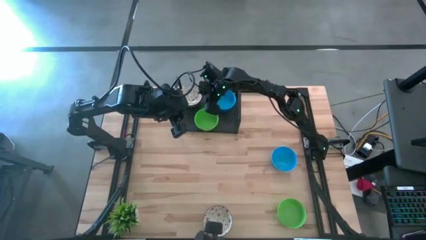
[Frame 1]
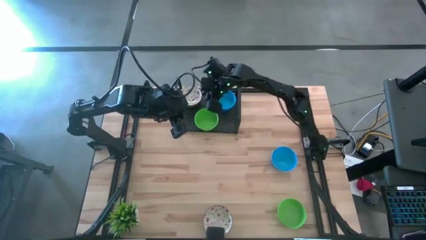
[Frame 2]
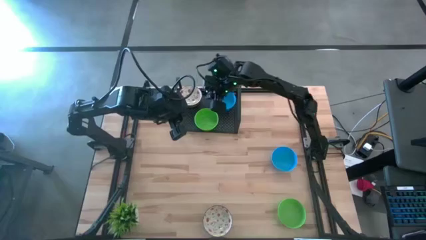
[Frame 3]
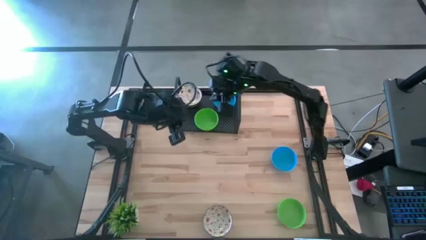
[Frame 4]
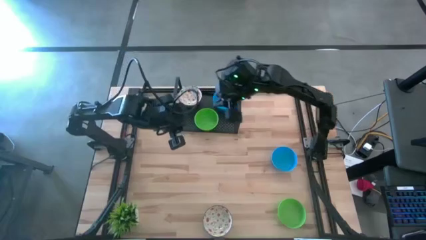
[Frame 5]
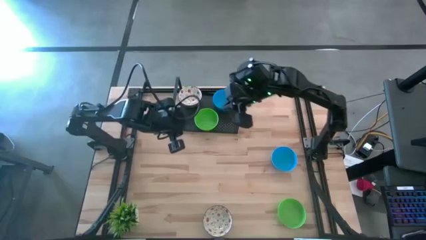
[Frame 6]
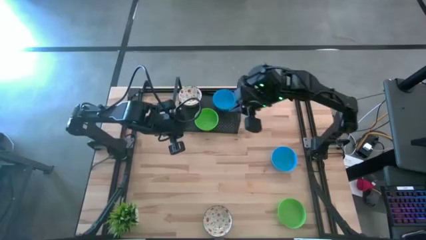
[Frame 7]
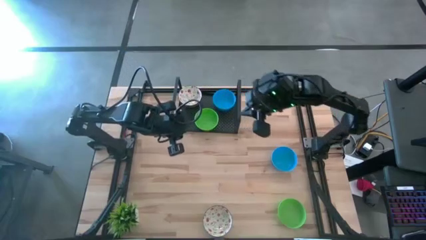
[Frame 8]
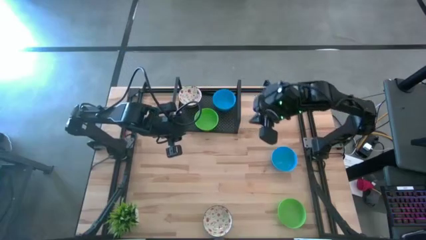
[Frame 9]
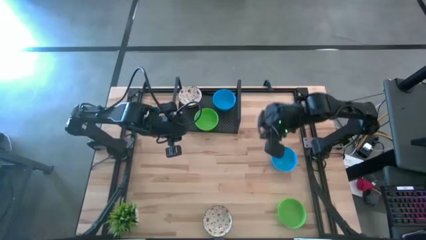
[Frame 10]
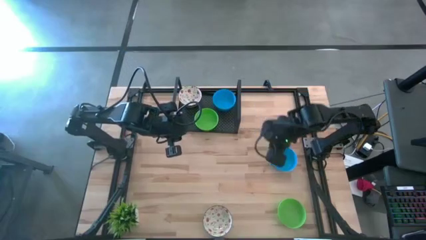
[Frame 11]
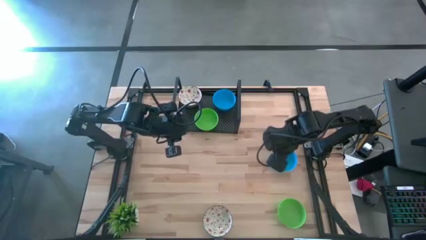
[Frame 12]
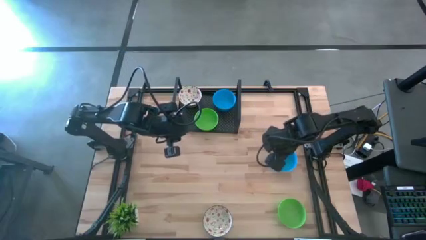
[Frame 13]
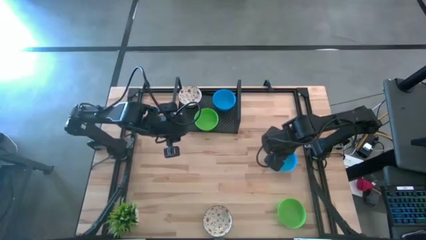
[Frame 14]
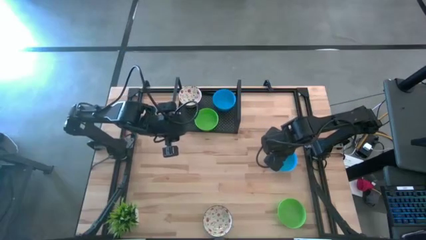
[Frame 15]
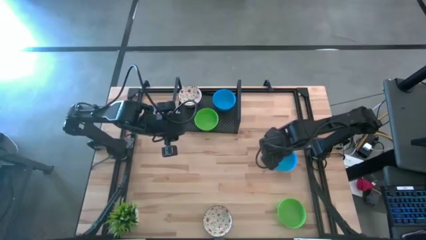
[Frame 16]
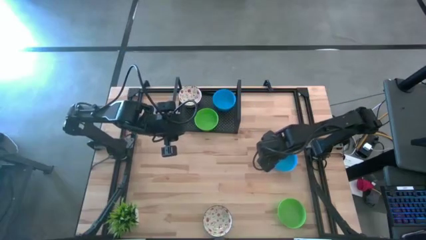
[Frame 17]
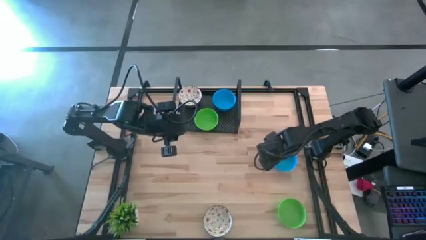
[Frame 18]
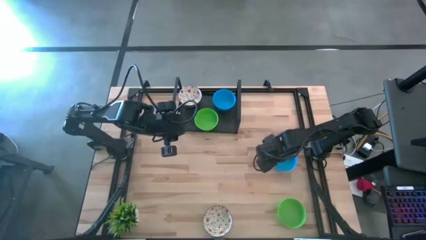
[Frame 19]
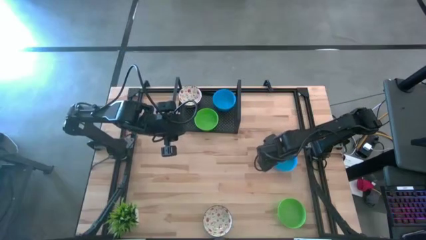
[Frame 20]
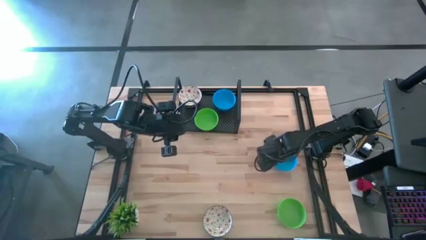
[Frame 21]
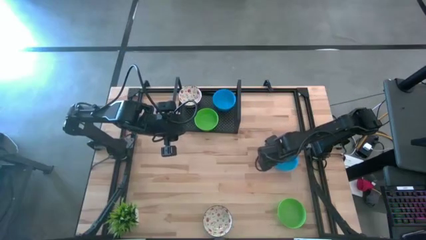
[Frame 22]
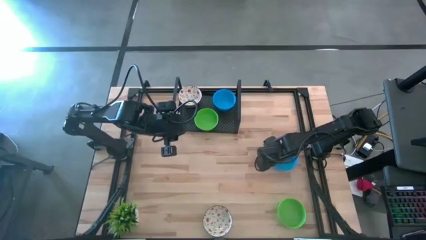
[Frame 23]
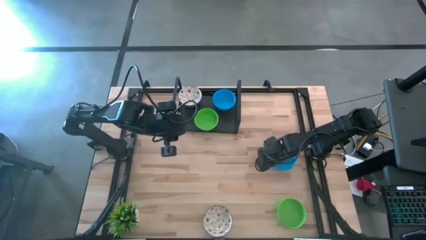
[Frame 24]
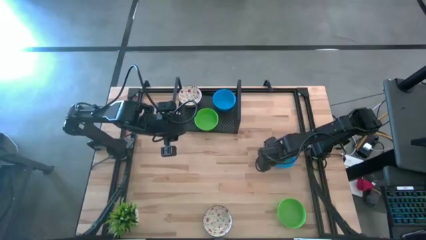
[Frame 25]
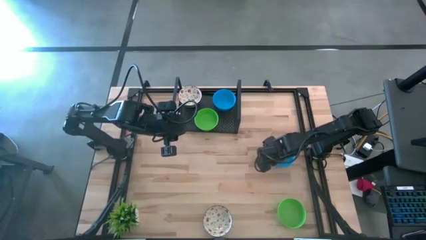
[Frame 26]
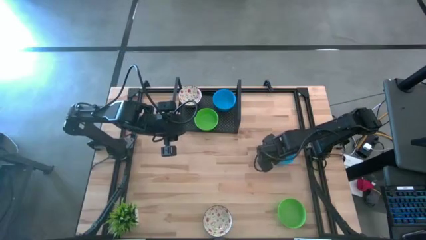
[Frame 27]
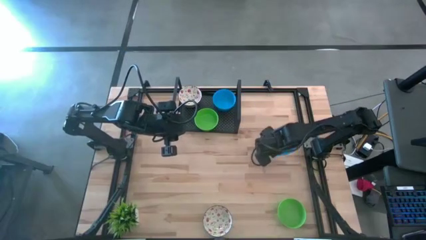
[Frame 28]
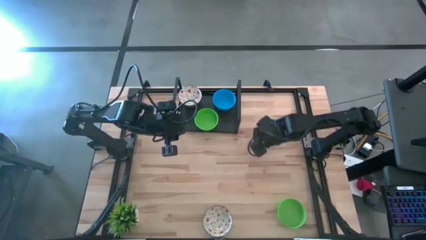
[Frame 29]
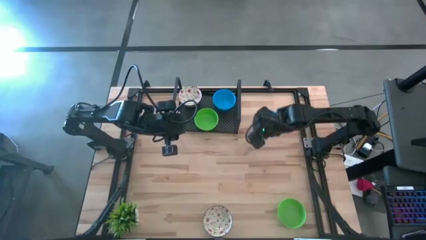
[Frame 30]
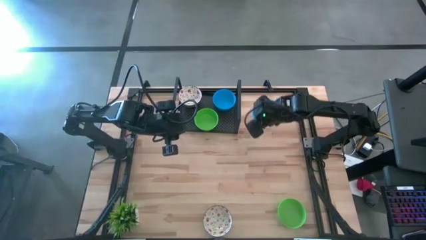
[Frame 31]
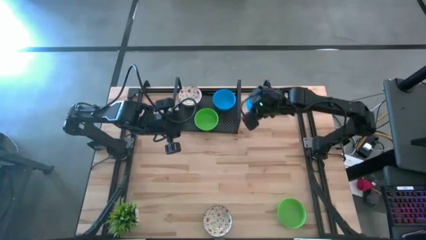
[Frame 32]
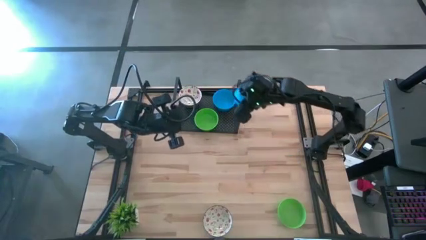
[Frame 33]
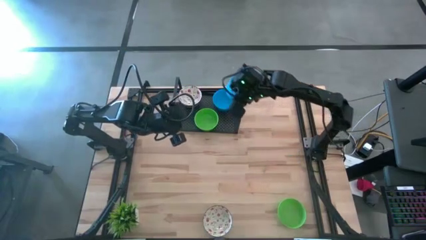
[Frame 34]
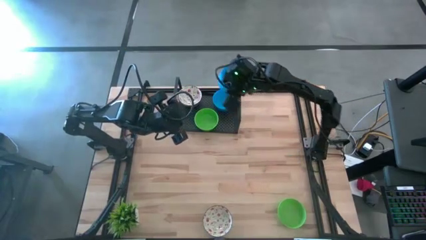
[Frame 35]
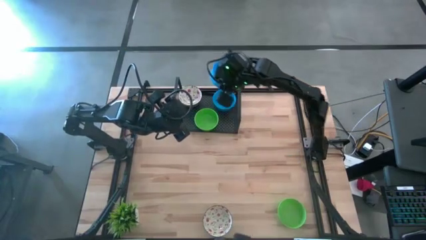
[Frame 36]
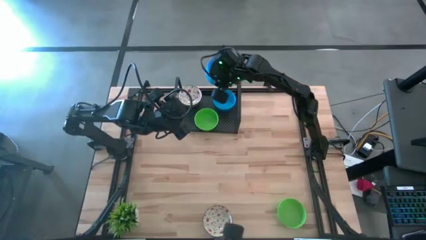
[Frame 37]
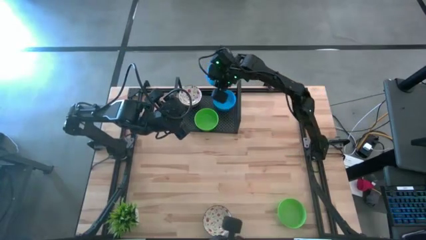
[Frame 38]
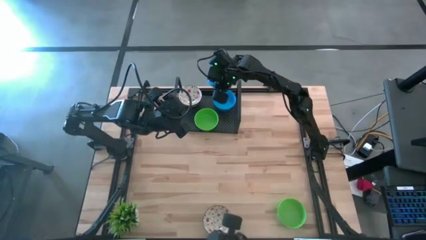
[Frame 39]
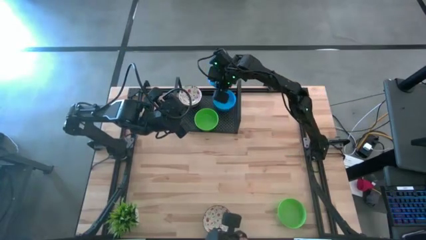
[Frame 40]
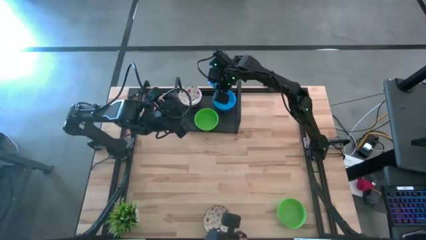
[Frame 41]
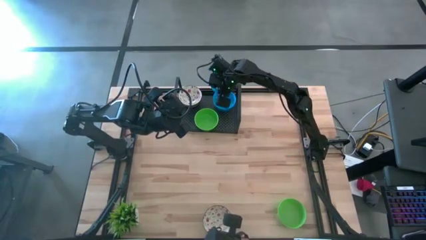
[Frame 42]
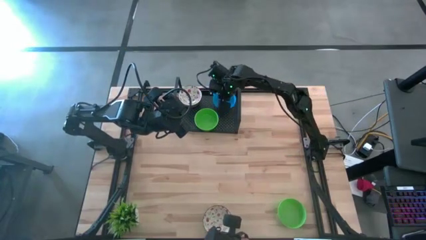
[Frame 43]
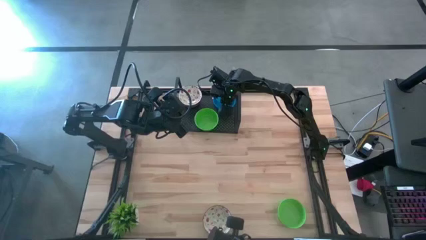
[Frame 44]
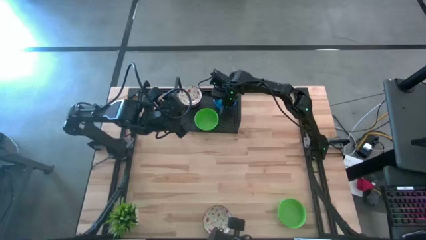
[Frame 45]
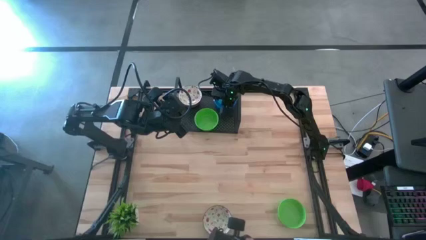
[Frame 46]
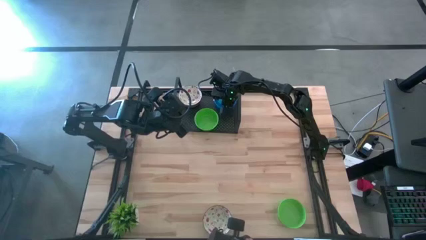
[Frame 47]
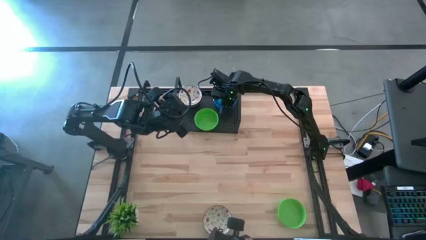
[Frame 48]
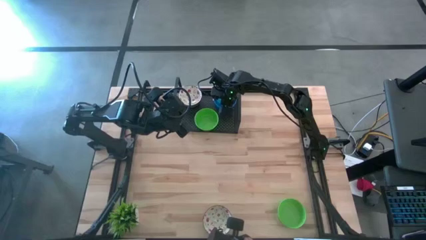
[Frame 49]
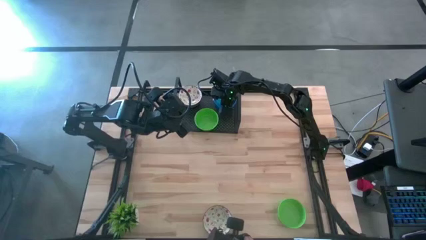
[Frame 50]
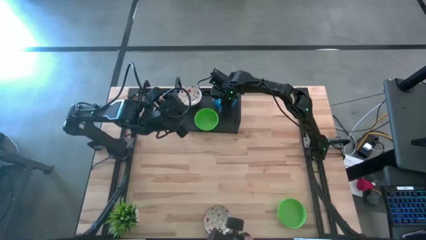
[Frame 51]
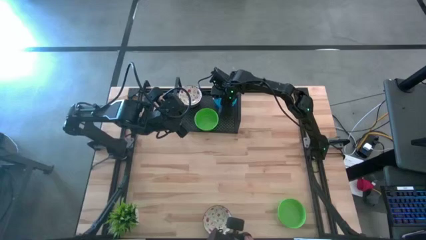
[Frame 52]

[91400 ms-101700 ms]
Task: Pick & Place Mini bowls
Stack the blue bowl on top of the blue bowls on the shelf

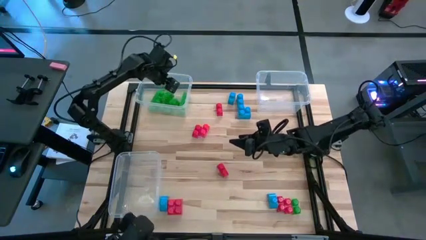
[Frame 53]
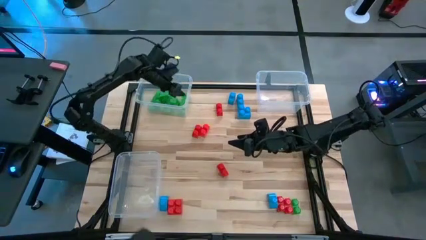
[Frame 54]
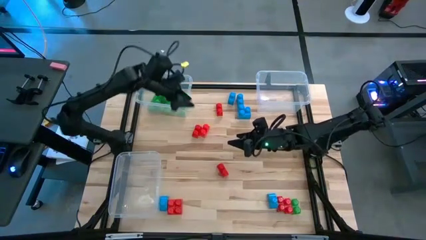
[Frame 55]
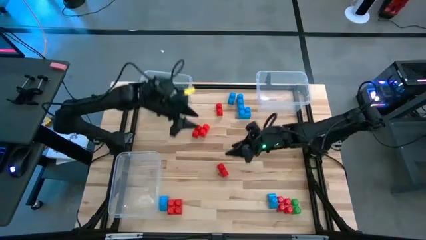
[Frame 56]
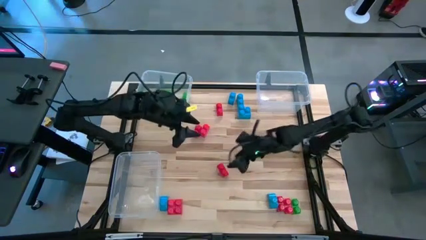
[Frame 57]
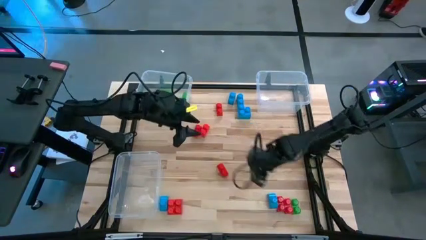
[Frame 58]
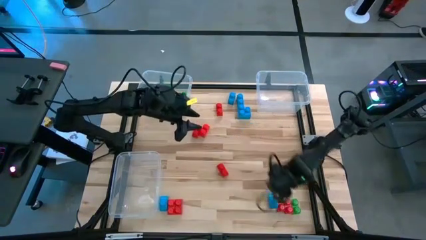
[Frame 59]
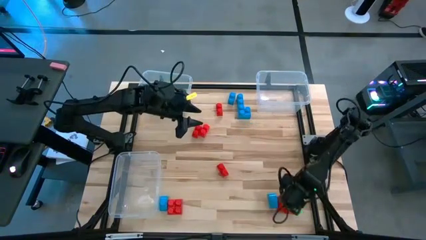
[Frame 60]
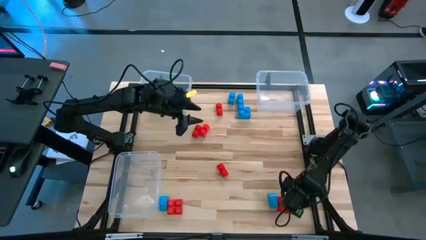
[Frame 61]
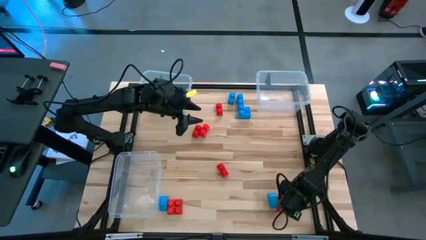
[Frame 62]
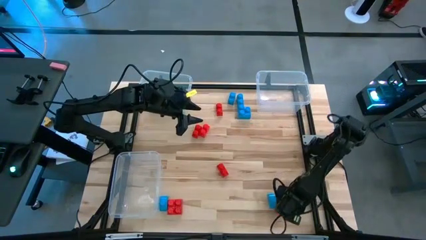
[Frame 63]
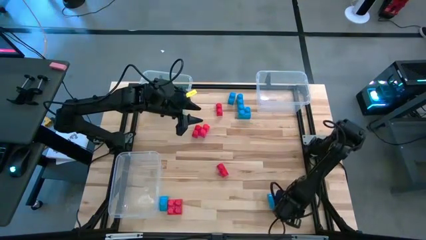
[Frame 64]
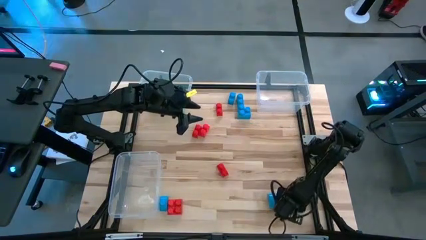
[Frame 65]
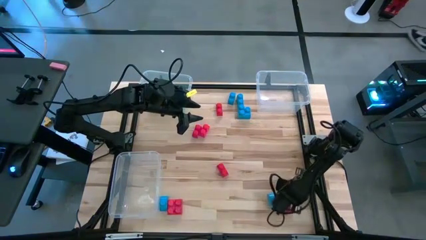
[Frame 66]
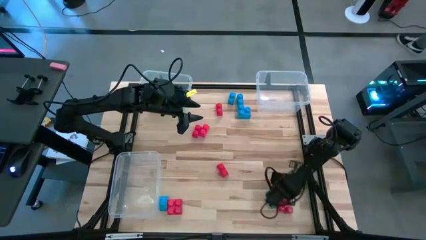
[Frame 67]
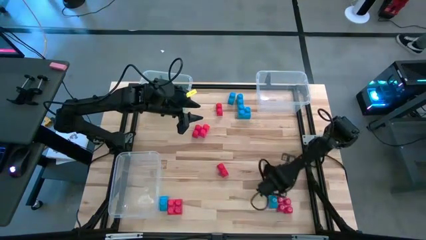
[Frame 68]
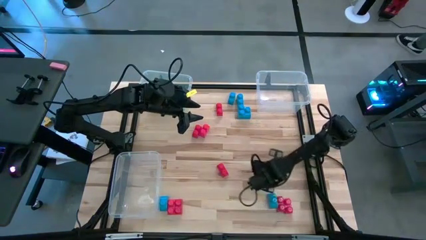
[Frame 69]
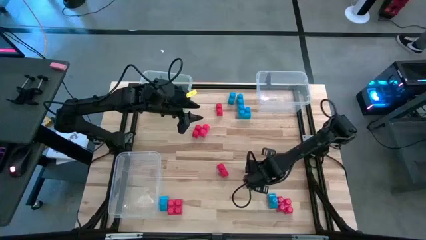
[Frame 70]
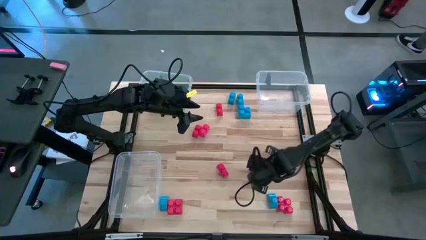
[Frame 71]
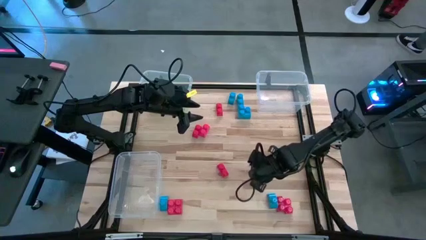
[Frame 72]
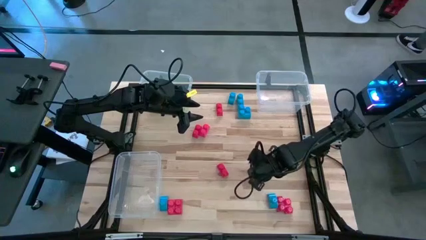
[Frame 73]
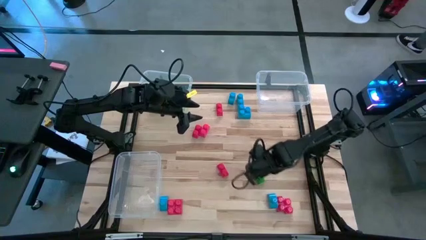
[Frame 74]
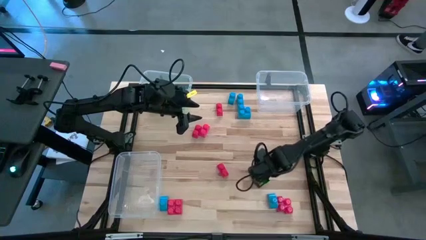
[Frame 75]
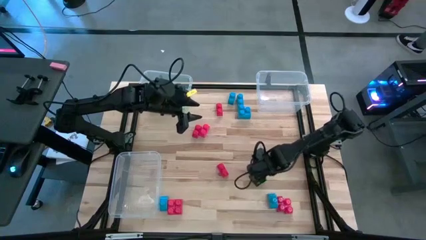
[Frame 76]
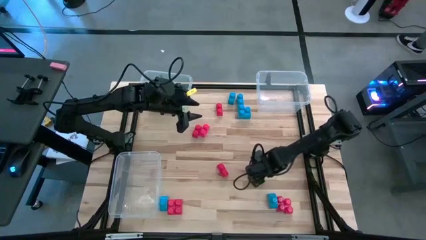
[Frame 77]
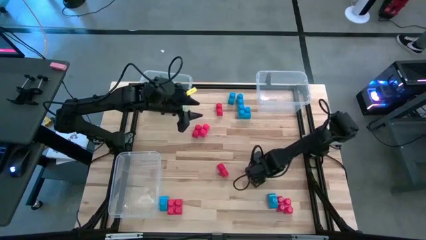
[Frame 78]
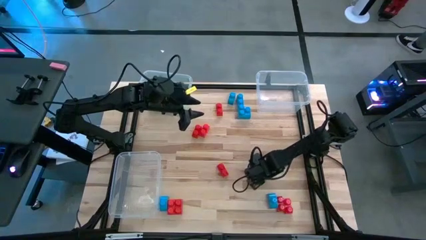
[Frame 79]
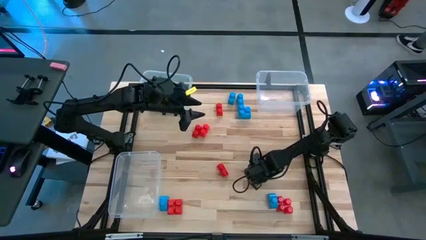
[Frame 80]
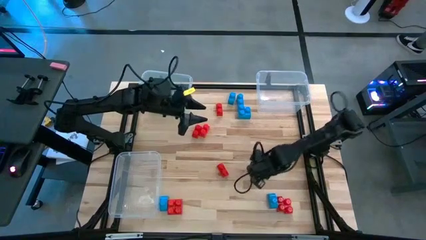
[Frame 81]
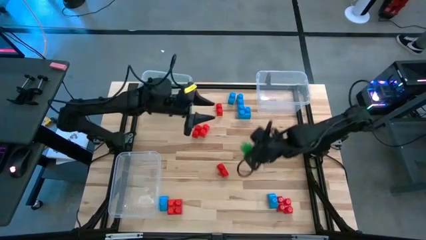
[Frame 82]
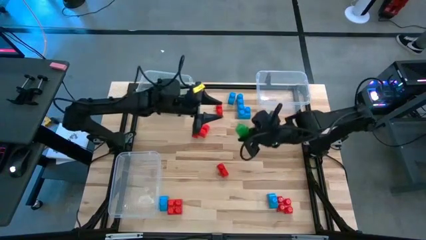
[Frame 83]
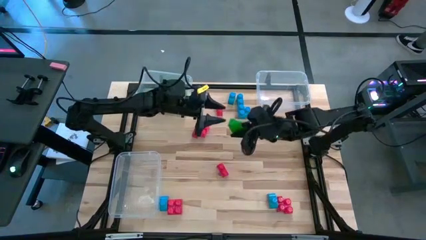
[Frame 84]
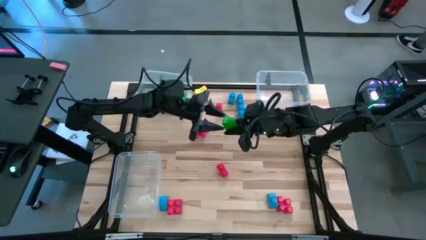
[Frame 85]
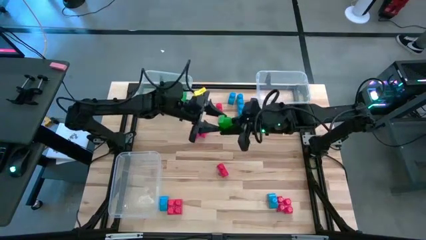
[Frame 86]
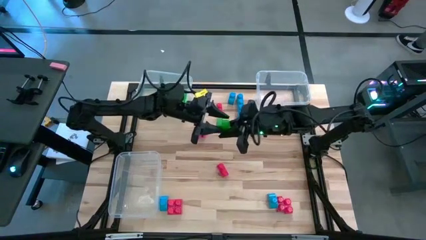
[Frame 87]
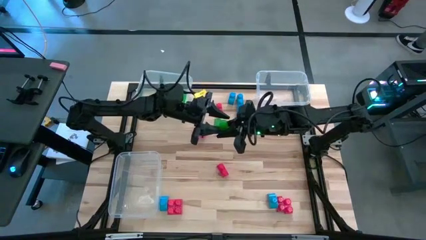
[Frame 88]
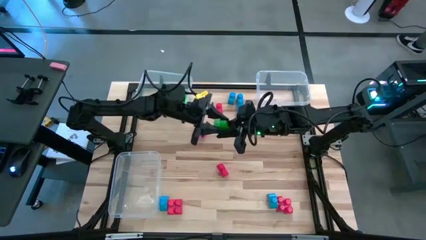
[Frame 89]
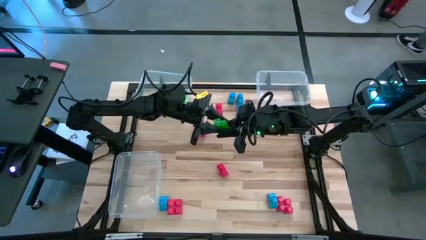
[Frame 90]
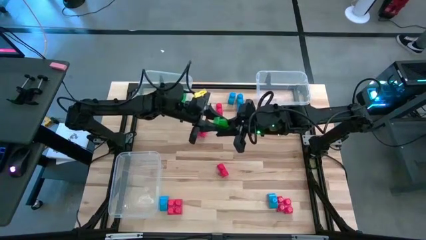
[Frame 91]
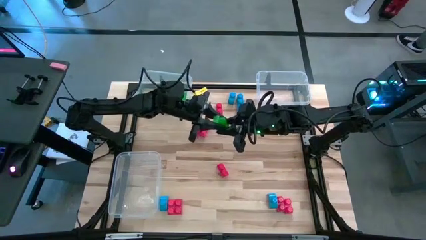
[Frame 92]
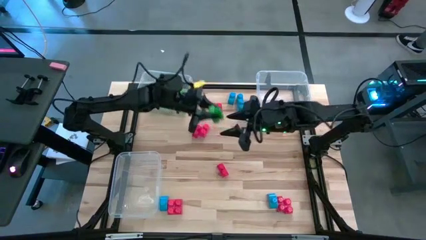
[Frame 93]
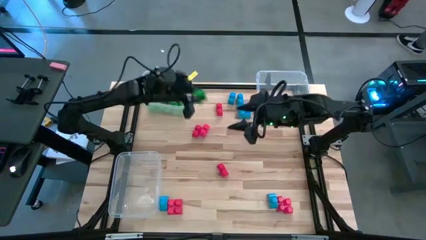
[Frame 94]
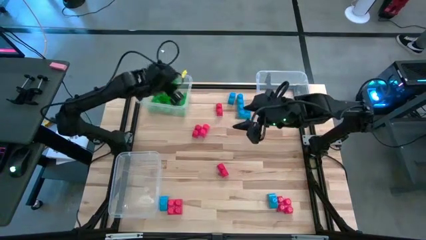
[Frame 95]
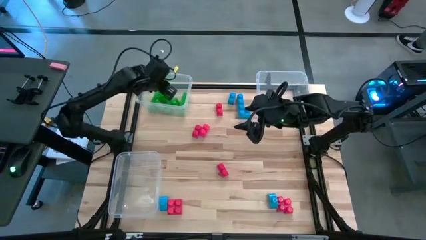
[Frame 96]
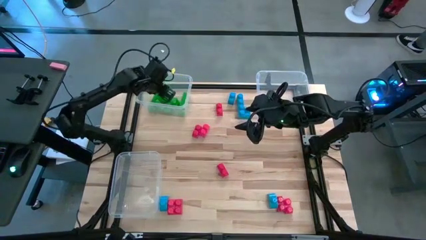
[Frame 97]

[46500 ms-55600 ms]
Task: Sort blocks
Put the green game piece into the top left transparent bin
